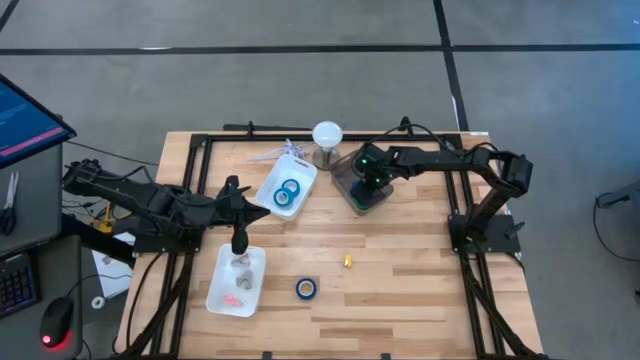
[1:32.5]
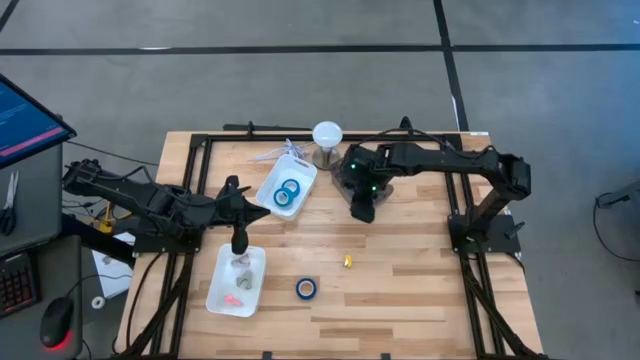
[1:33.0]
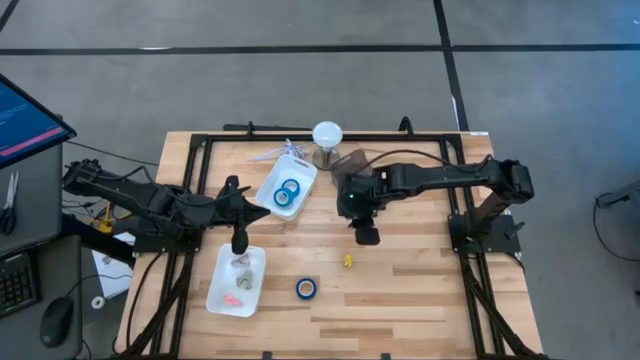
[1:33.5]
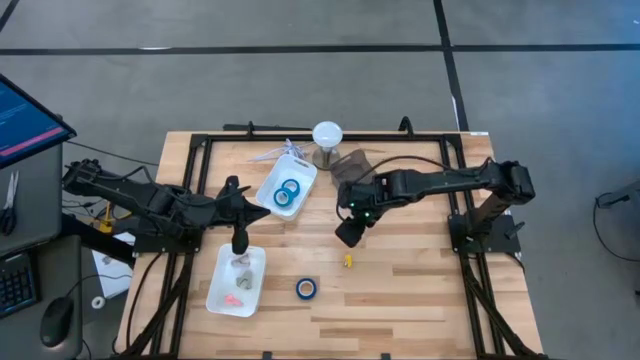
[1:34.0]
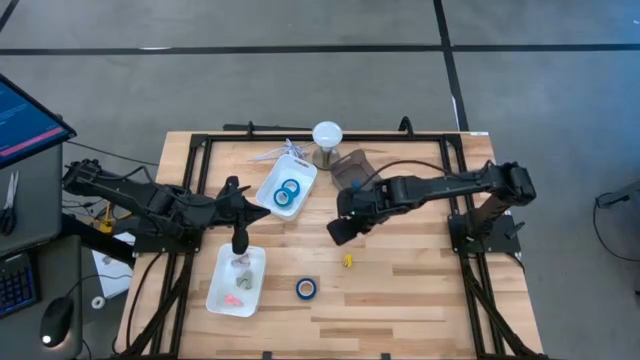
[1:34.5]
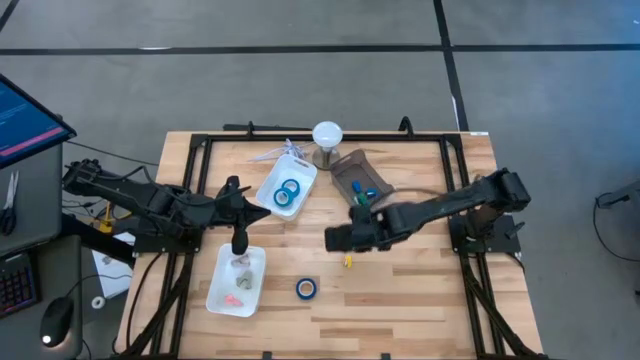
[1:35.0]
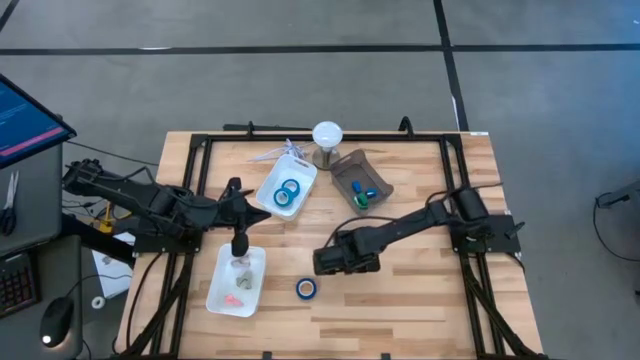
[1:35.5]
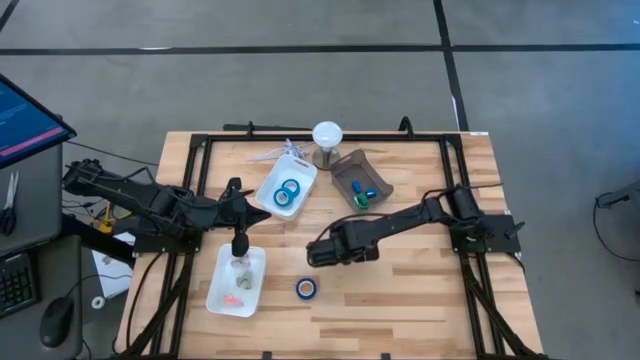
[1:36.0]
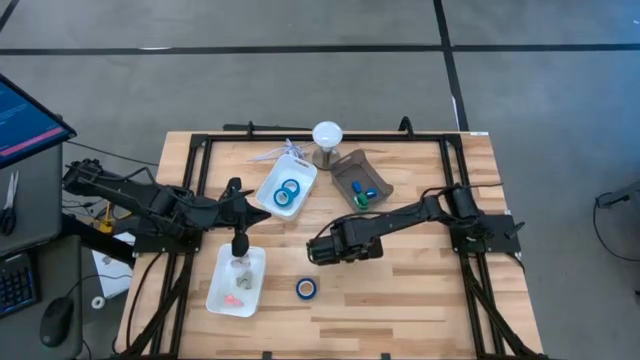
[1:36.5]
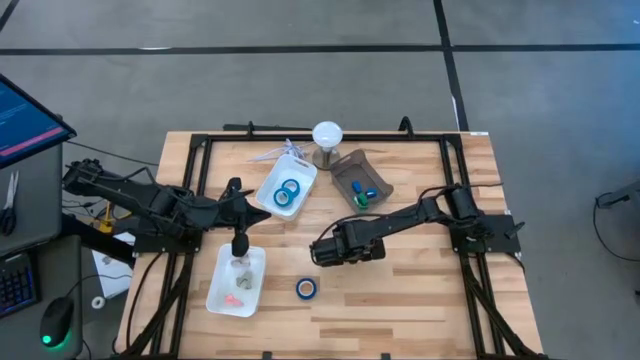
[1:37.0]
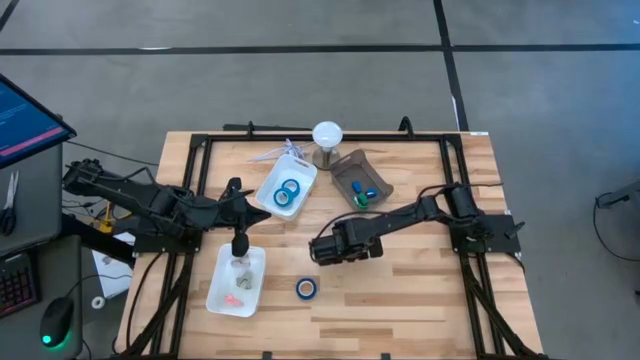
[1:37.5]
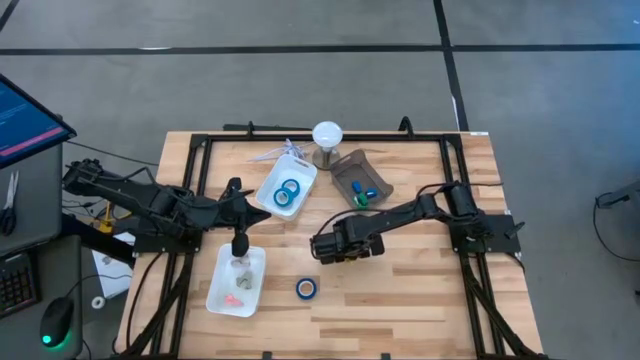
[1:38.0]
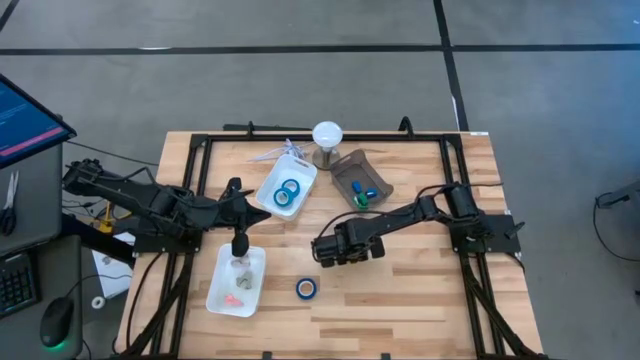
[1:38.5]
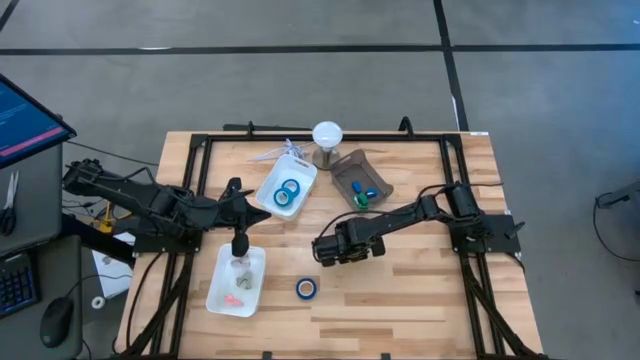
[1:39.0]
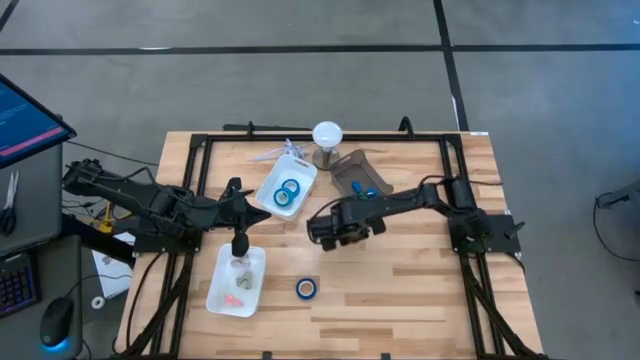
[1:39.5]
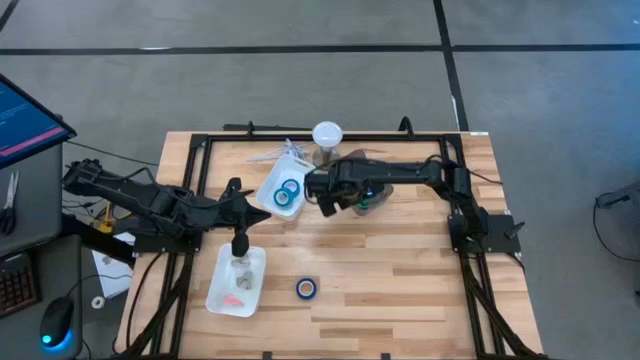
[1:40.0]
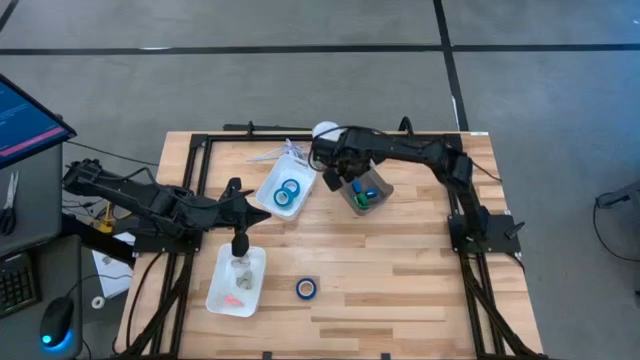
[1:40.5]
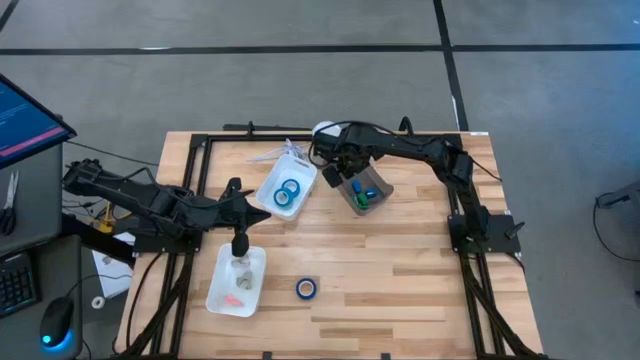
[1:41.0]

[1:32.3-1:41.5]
Task: Pick and place Stapler, Stapler remover, tape
Put the yellow stapler into the black bin

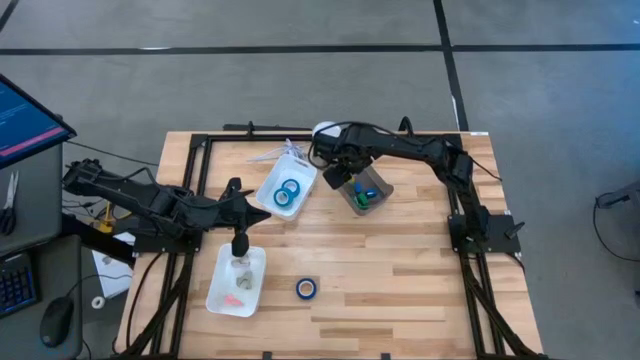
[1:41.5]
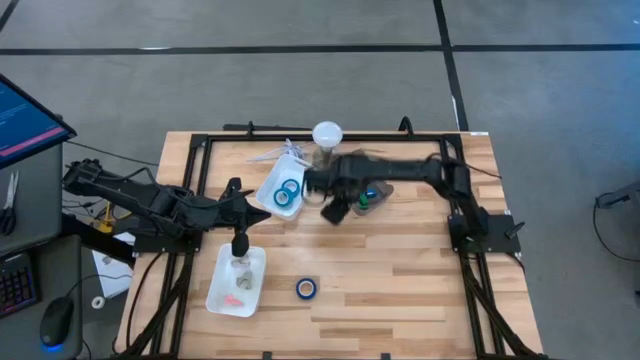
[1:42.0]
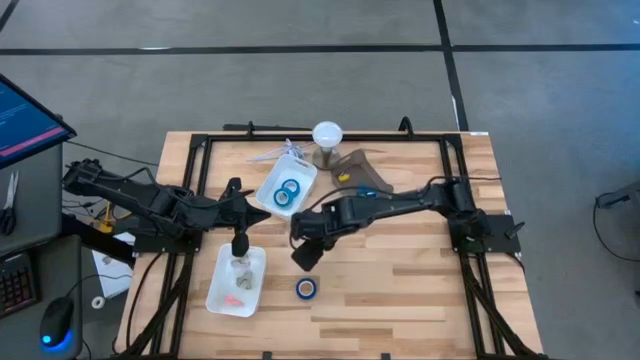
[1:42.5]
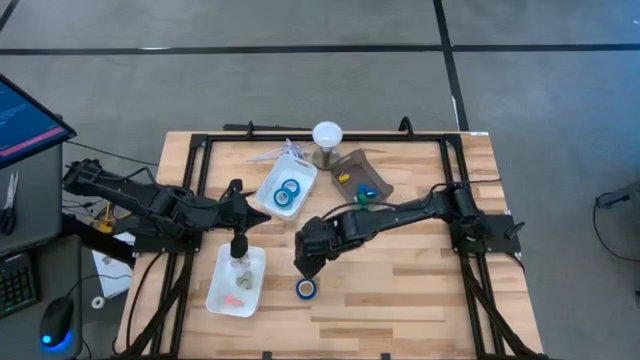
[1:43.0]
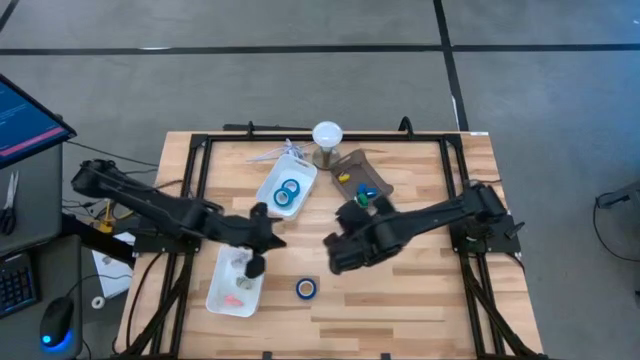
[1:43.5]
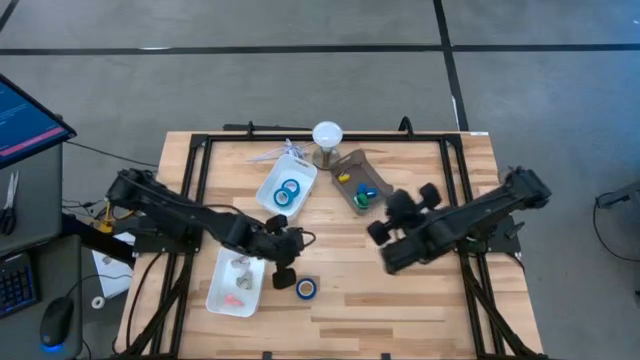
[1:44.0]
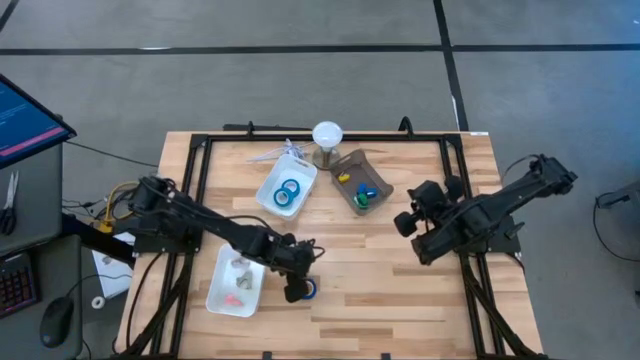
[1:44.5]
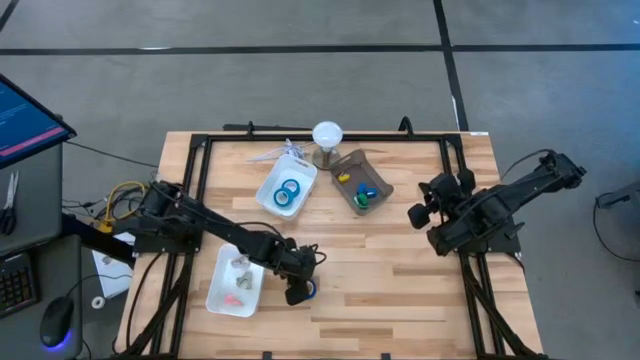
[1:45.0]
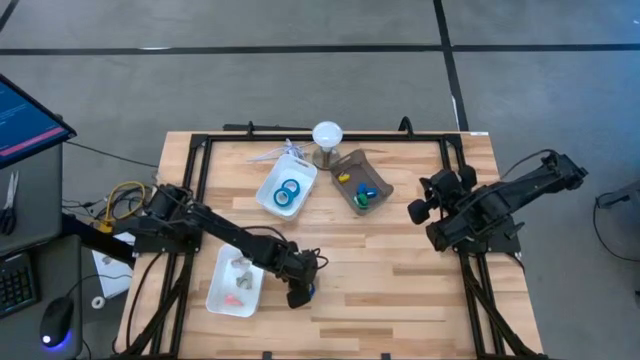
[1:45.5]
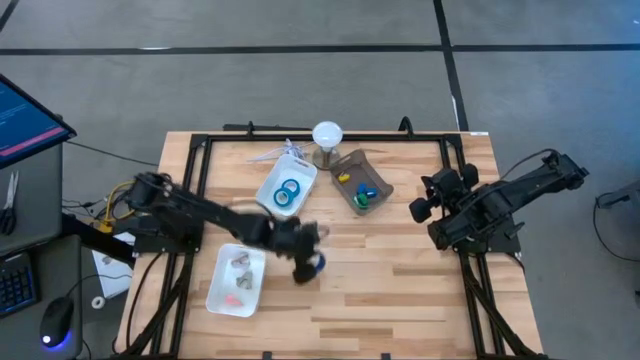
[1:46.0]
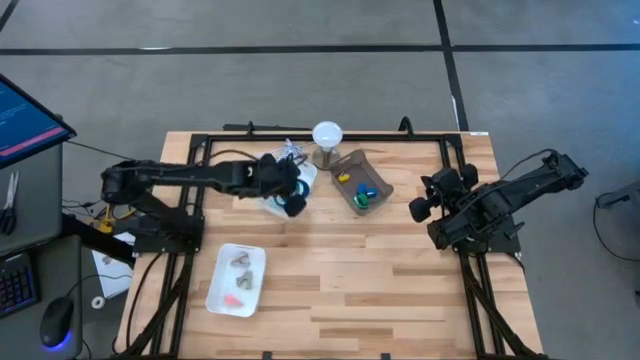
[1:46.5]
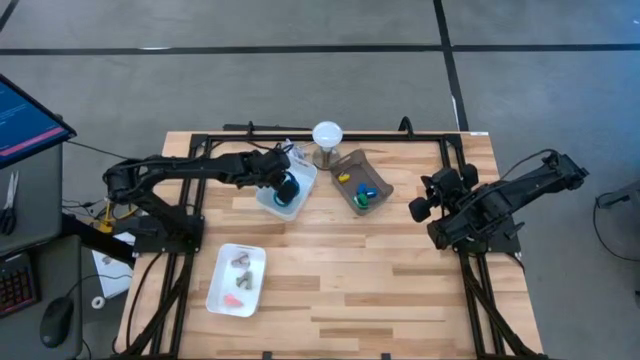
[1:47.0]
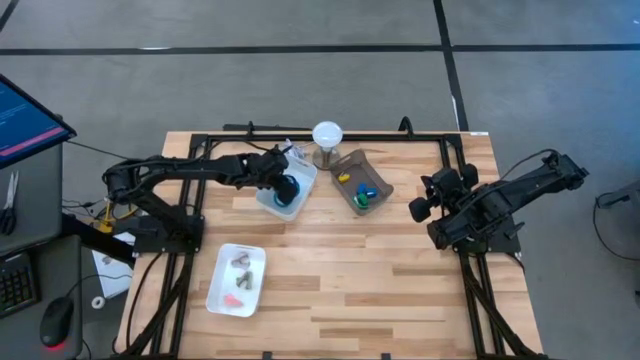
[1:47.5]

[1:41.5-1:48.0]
Put the dark blue tape into the top white bin

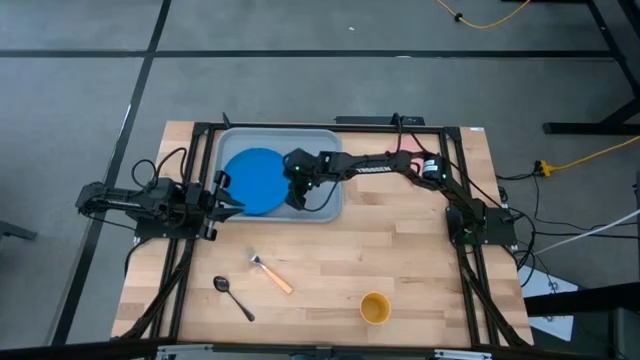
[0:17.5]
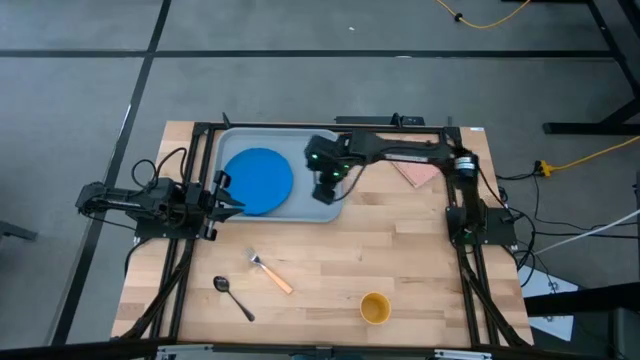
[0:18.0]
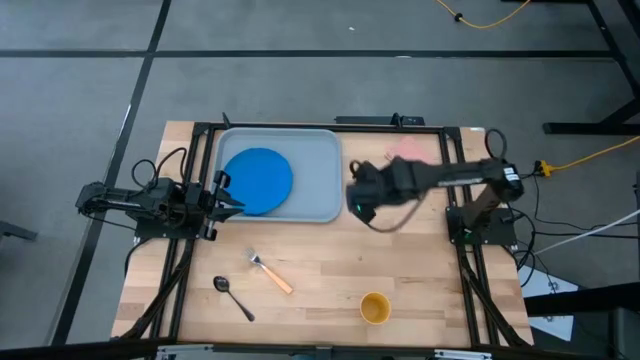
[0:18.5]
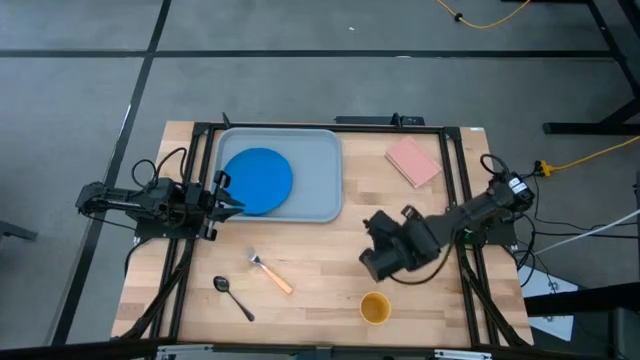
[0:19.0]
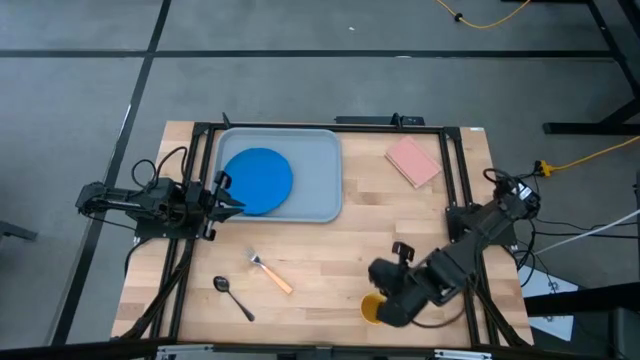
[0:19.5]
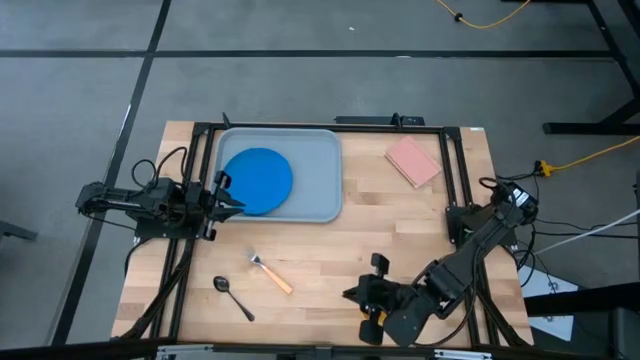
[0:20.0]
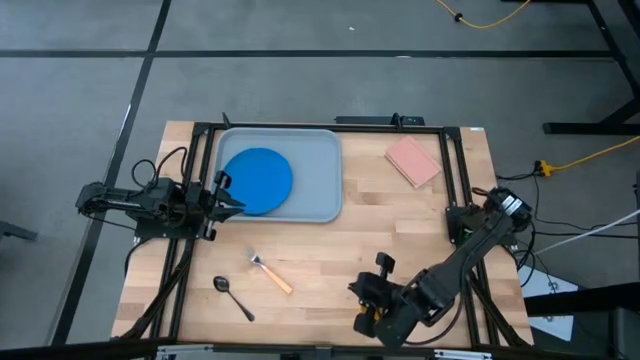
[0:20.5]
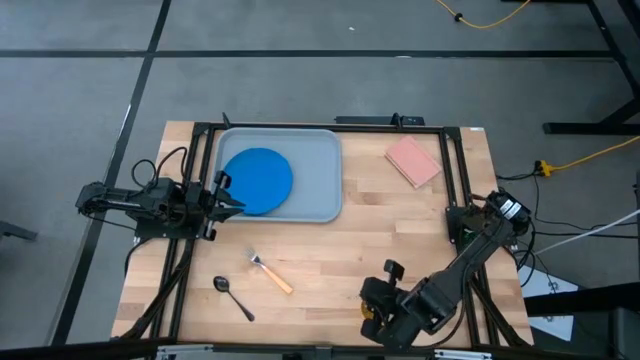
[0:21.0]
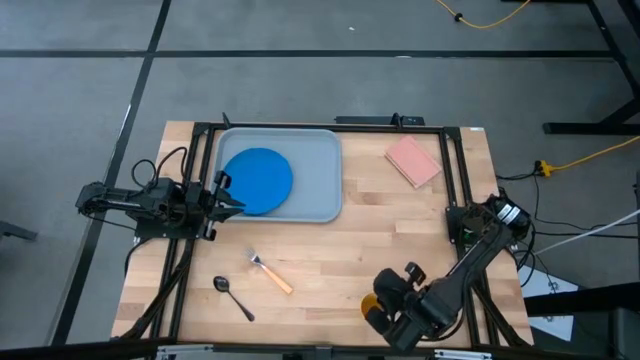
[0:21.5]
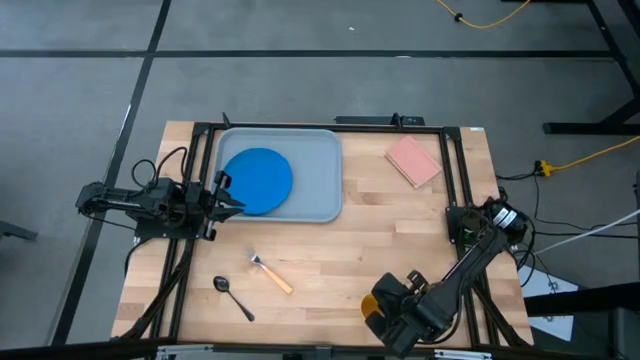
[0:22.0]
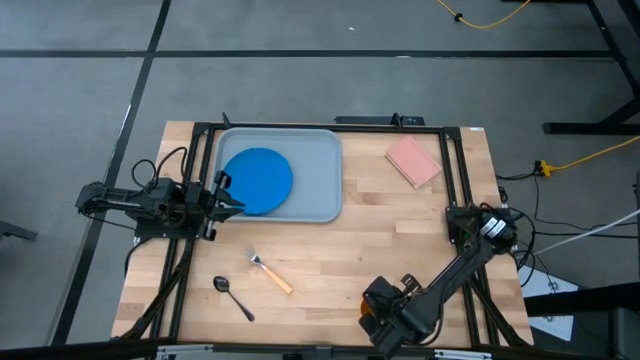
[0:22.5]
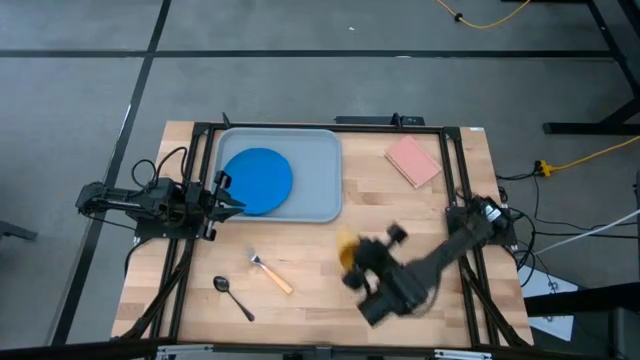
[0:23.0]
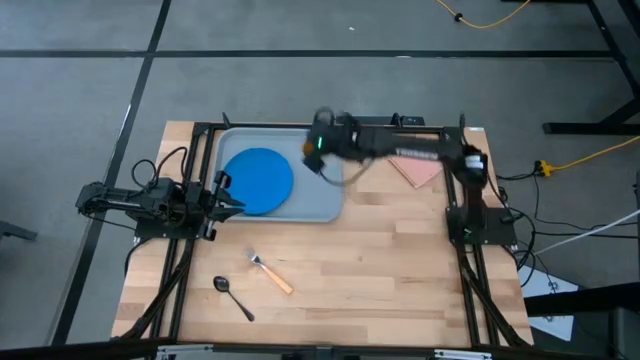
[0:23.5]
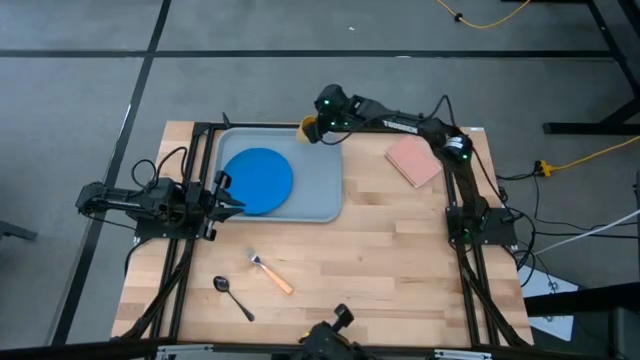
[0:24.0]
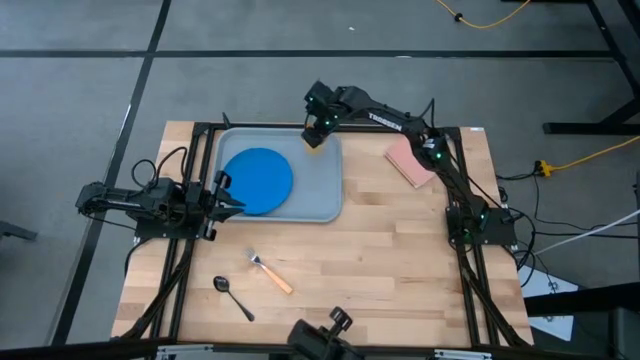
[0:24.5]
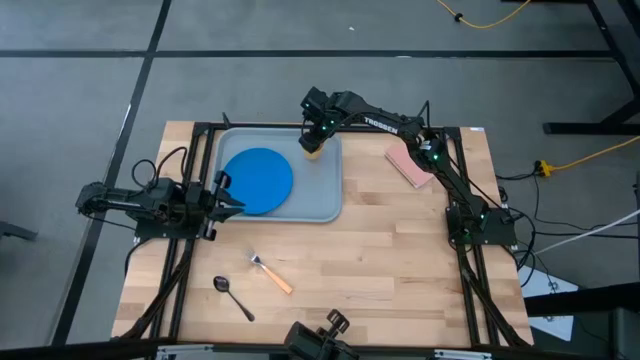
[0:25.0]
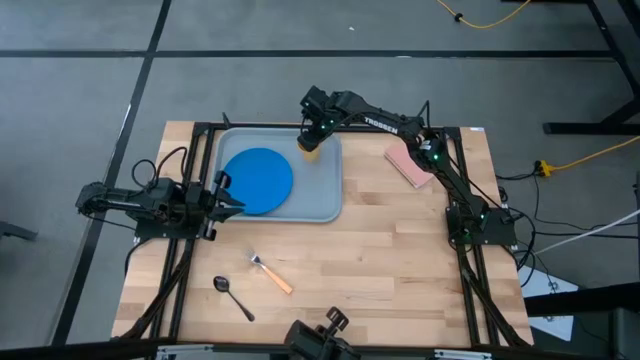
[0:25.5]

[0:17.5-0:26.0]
Task: Pick and place plate/cup/fork/spoon on tray
Put the yellow cup on the gray serving tray to the top right of the blue plate
